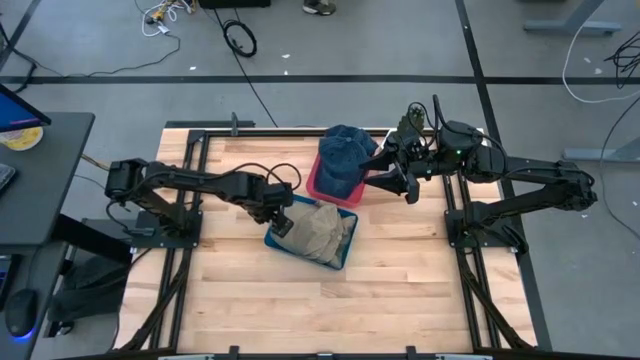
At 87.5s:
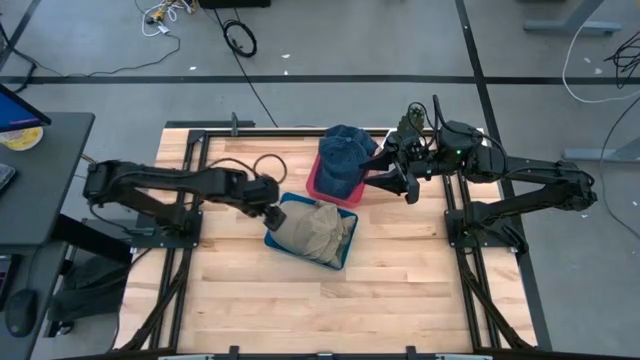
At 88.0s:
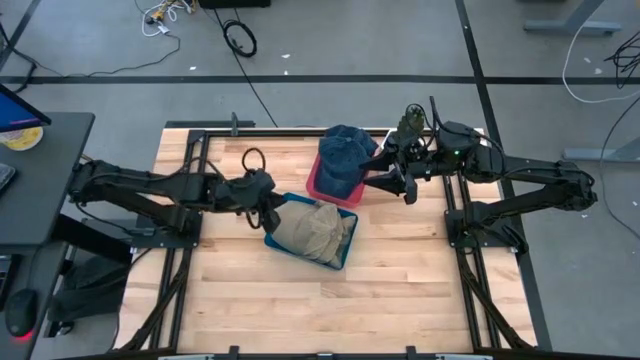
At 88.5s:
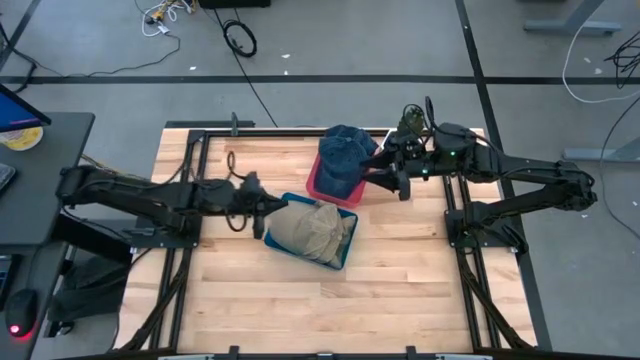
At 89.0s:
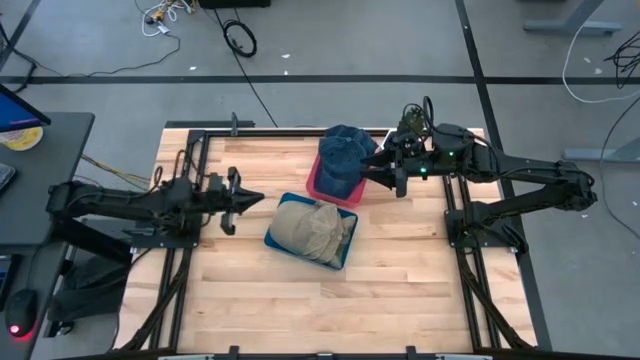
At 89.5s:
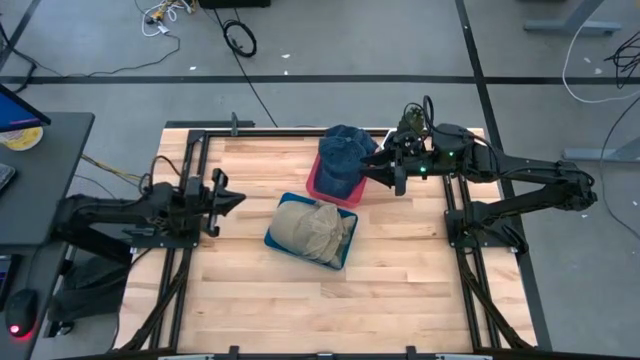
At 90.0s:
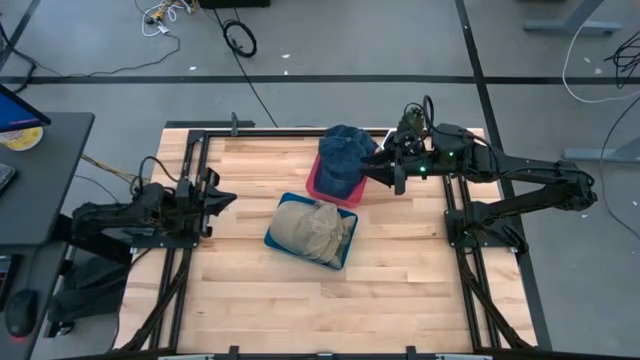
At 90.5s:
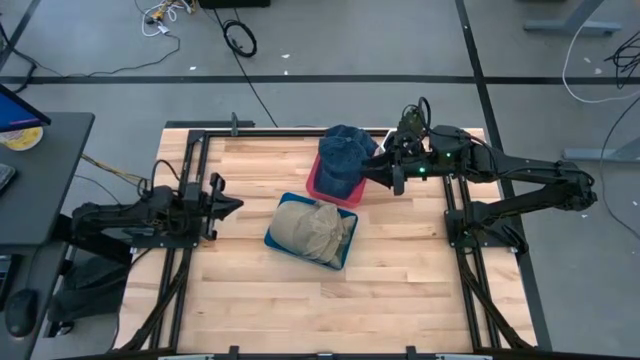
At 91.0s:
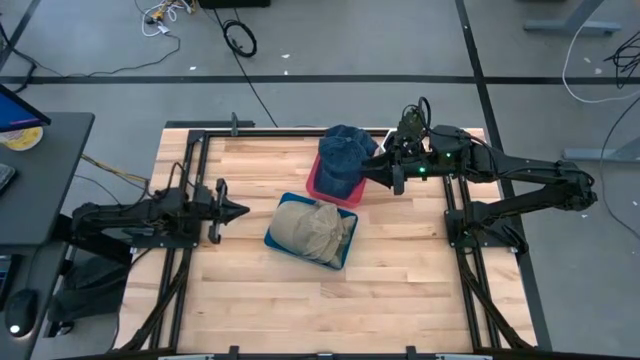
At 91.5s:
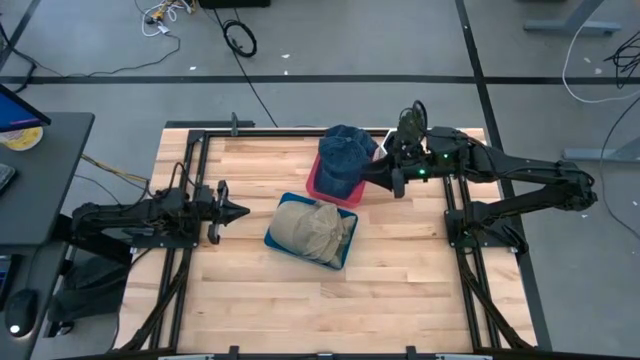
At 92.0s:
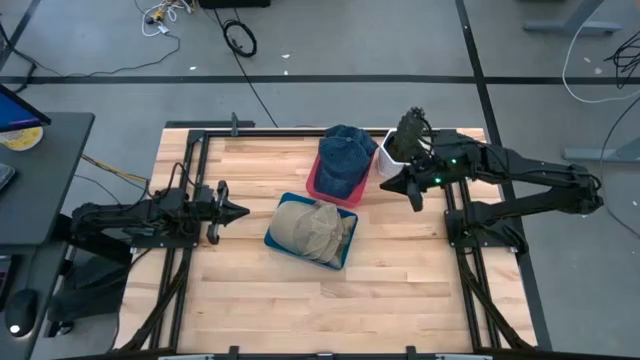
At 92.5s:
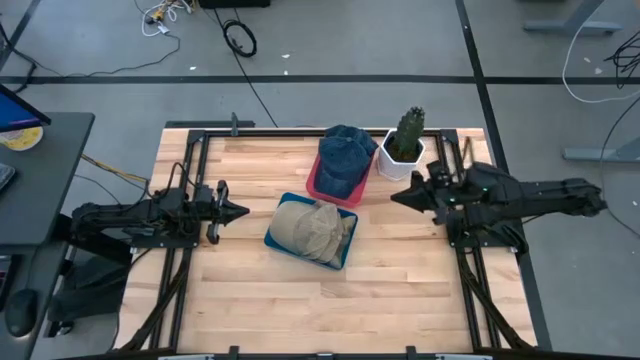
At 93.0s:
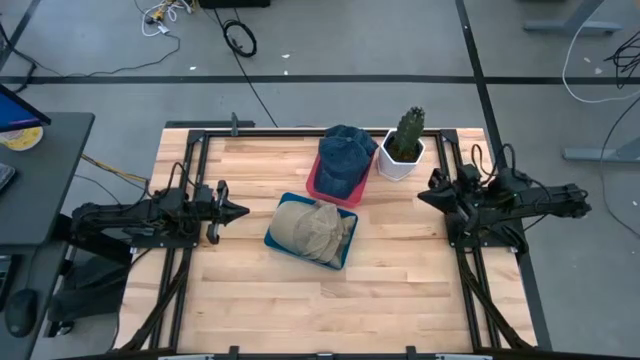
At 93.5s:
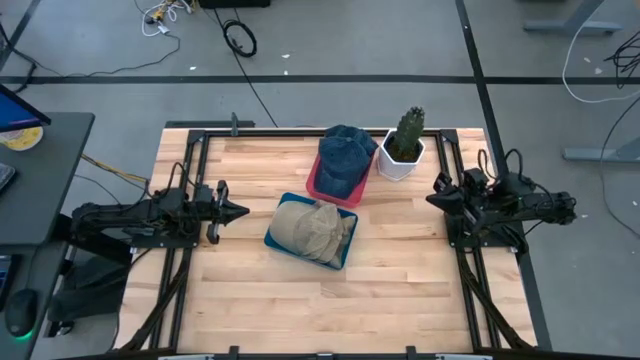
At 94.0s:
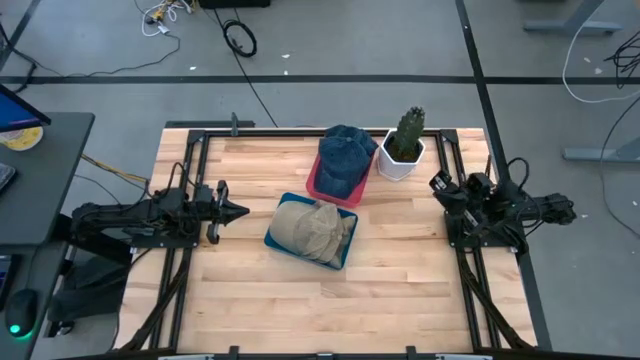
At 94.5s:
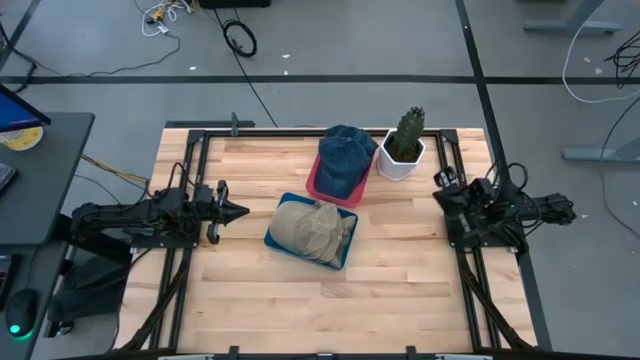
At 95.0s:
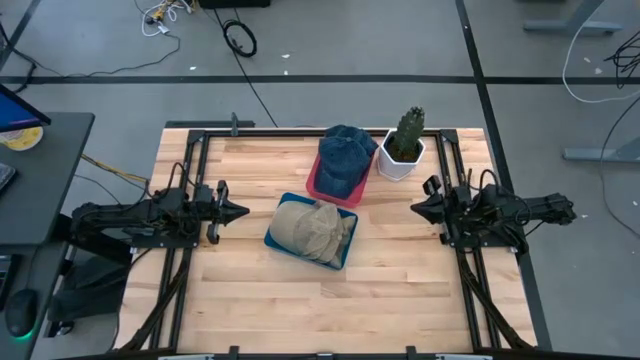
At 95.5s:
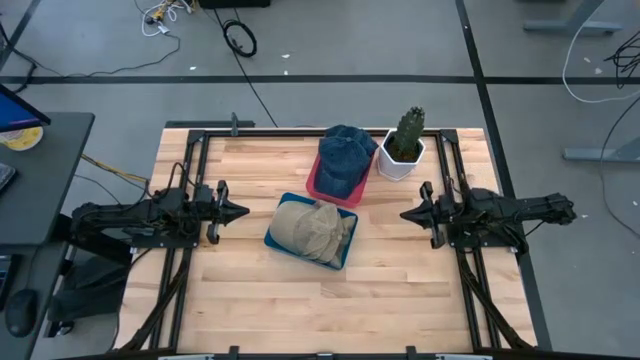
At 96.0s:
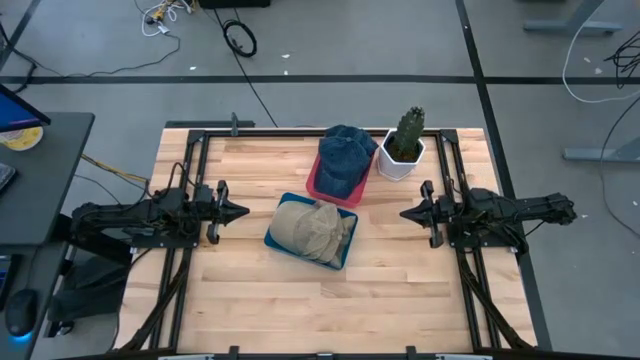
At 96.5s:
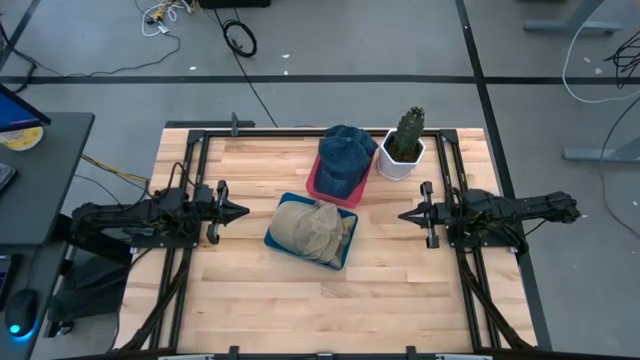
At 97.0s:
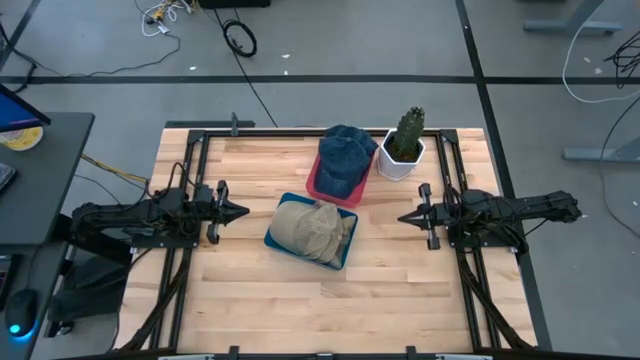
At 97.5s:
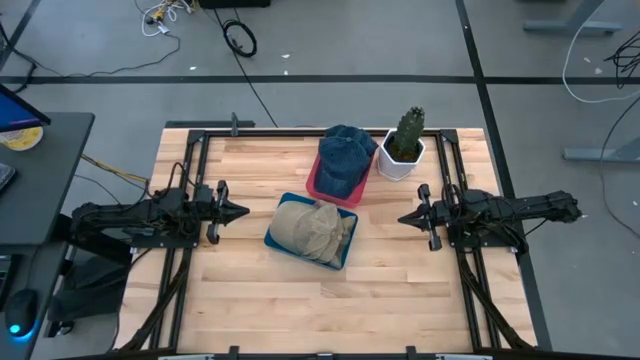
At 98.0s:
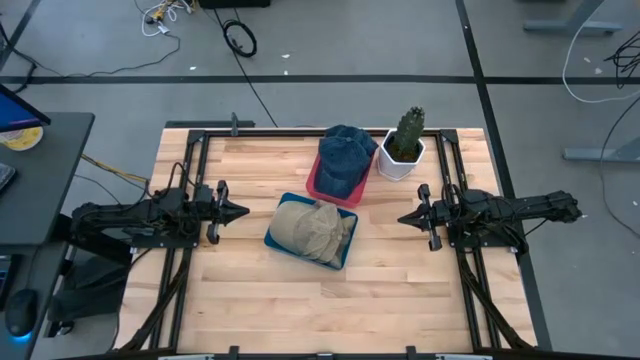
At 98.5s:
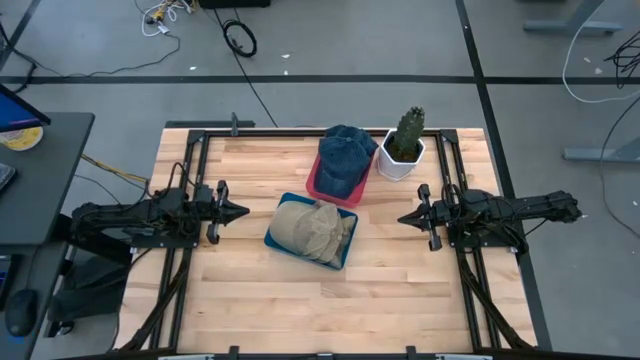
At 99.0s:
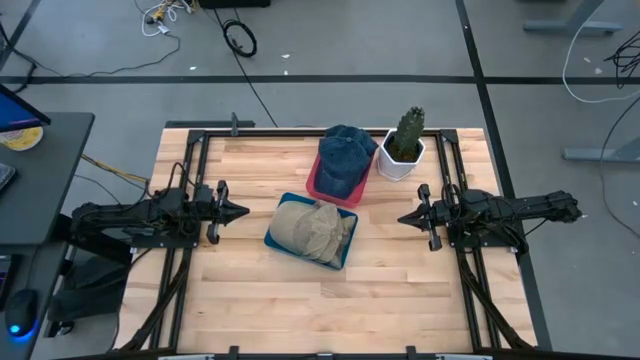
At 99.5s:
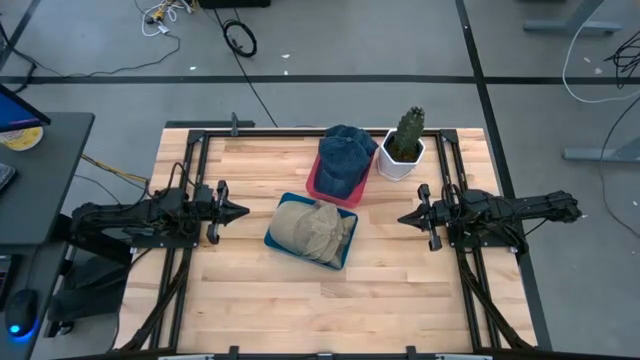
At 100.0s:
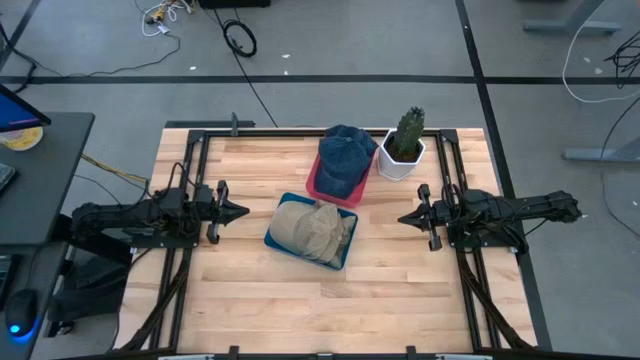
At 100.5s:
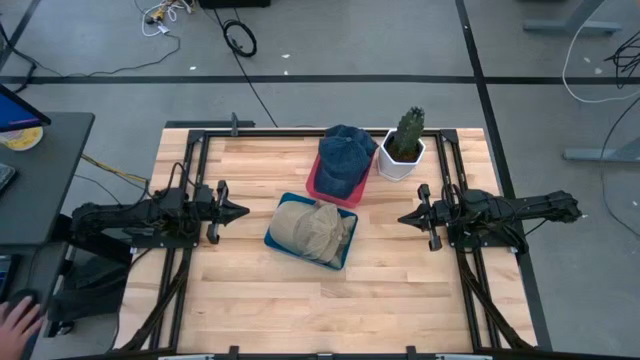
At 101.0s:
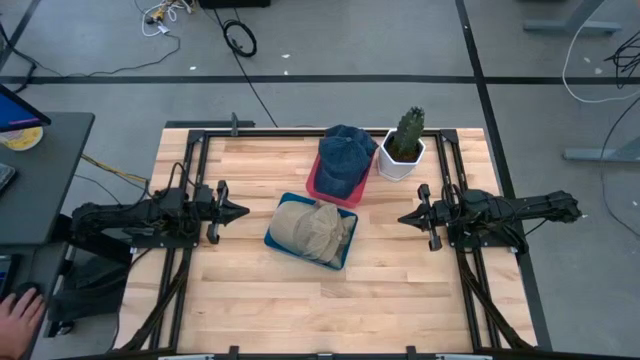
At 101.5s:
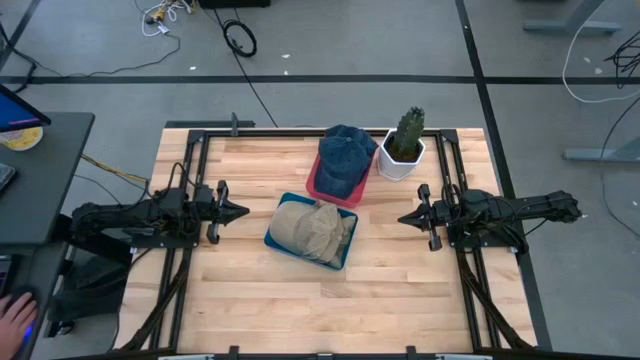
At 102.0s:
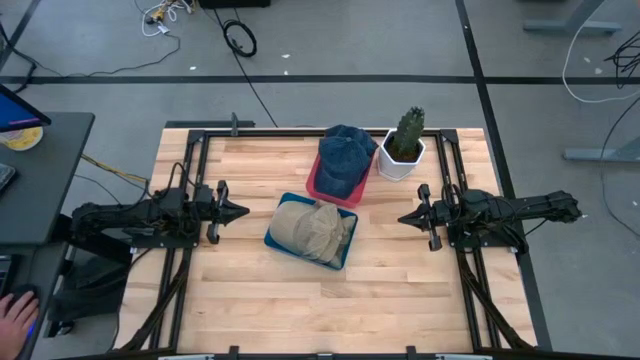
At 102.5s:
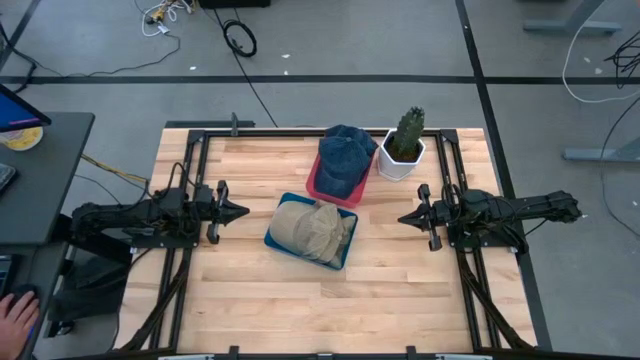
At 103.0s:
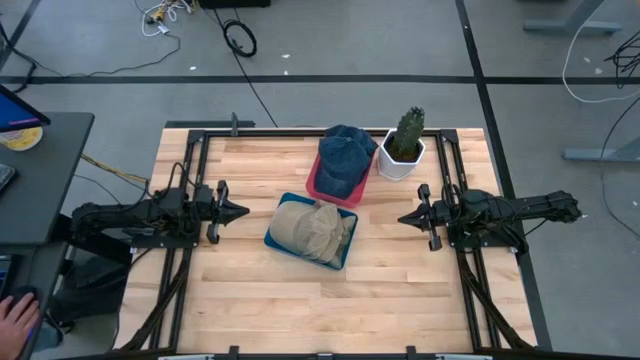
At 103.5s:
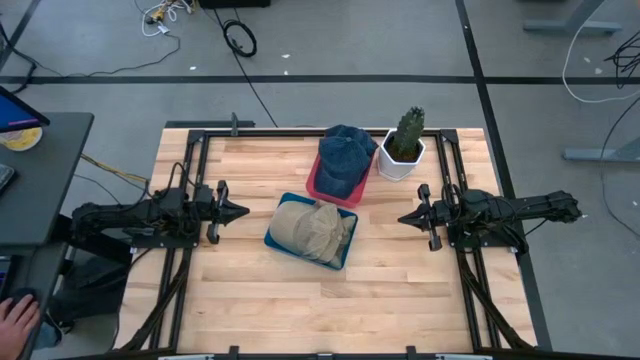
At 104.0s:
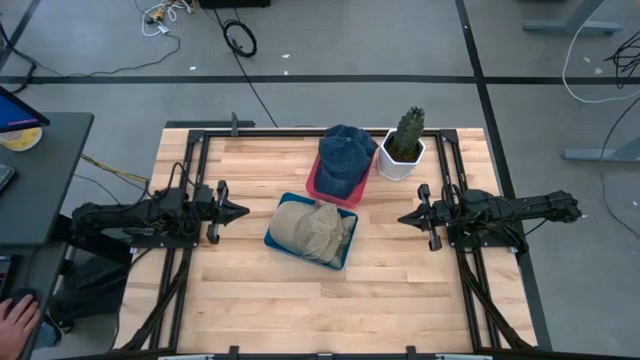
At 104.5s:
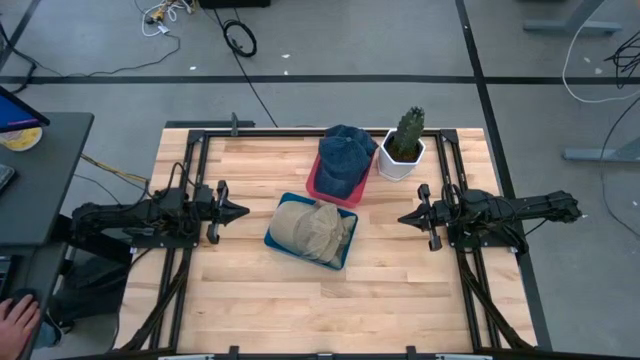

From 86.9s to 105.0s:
Task: Pick & Place hat
Return to Home Position

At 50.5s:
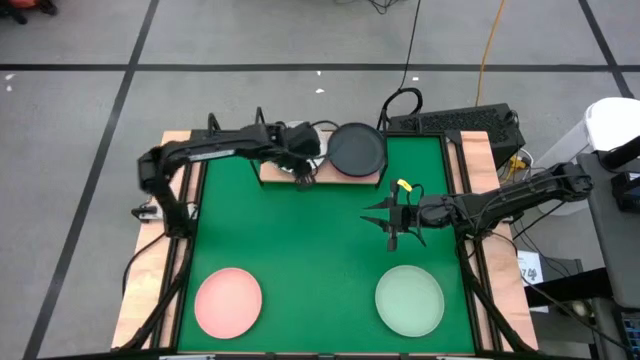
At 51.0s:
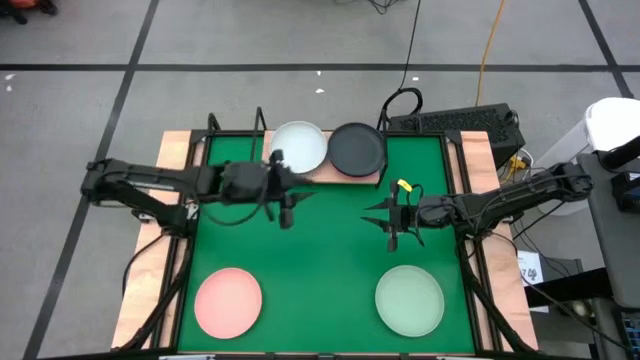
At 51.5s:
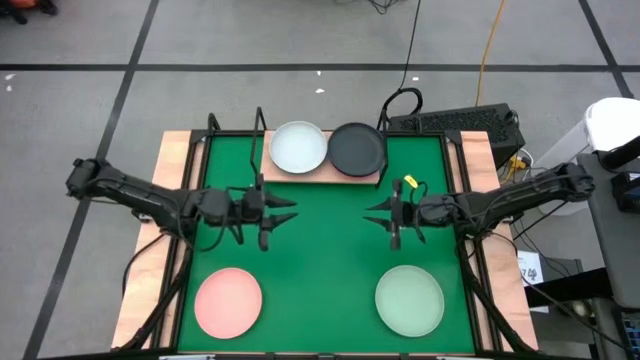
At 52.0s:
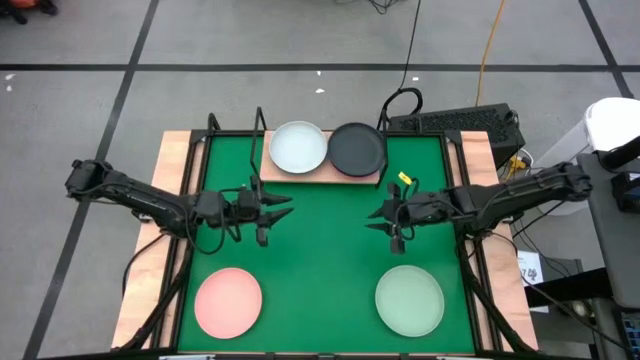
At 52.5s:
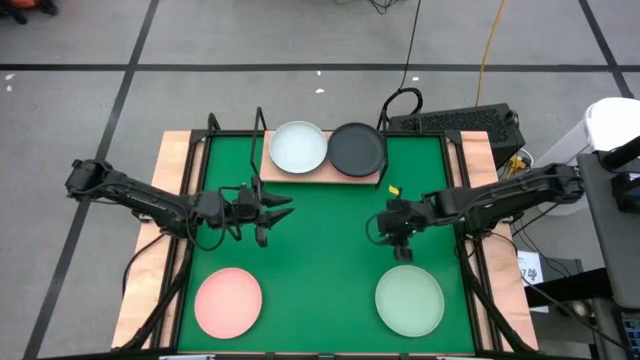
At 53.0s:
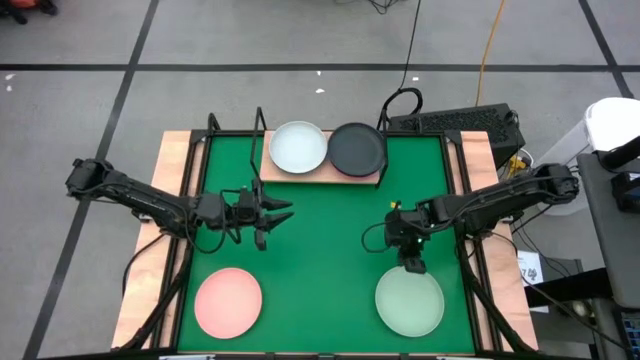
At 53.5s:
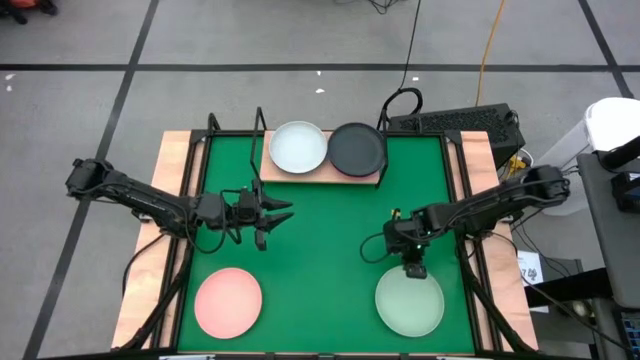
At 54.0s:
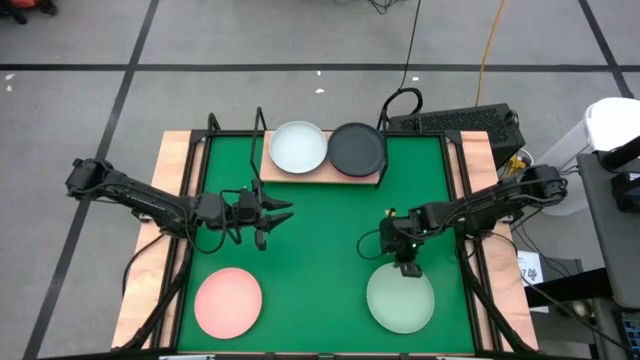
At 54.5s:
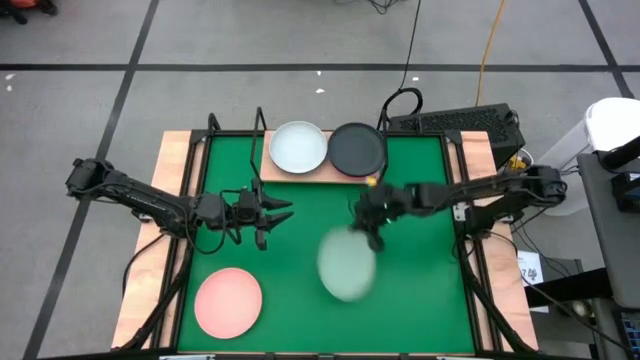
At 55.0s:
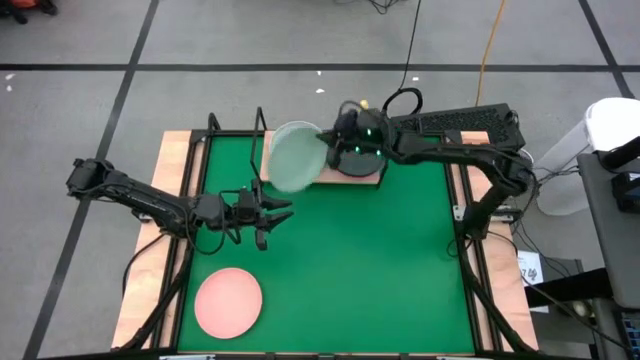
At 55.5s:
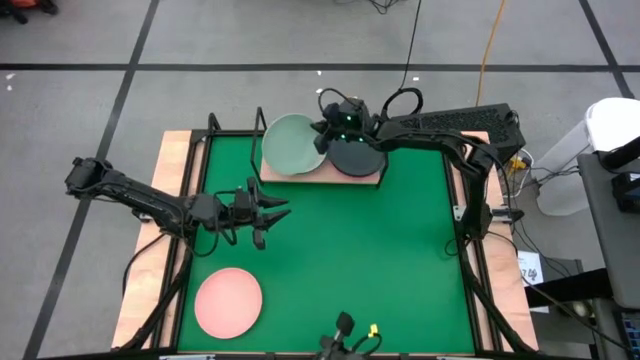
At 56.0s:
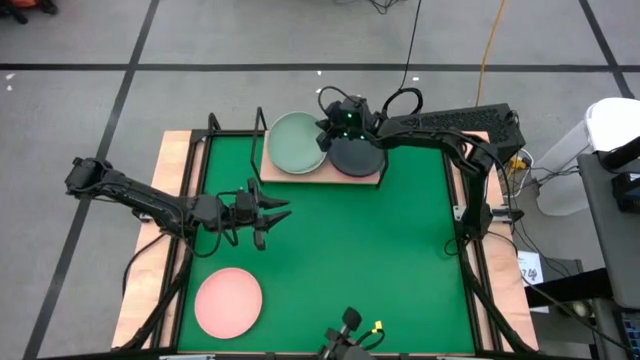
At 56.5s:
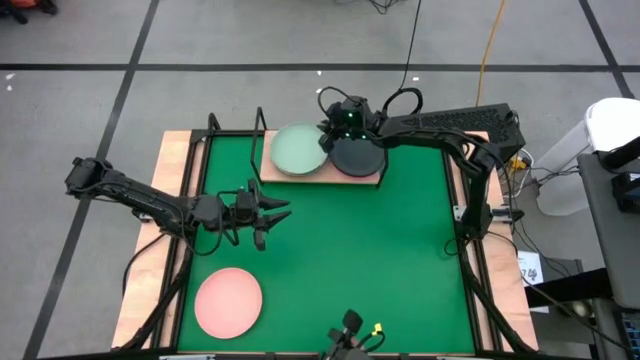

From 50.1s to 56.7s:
Task: Place and stack plates onto a shelf
Stack the light green plate on top of the white plate on the shelf
